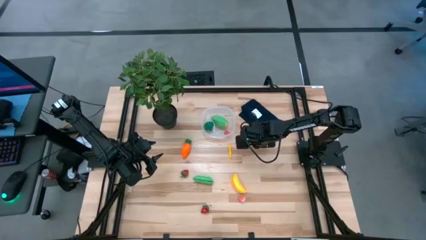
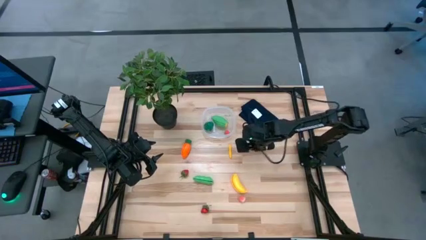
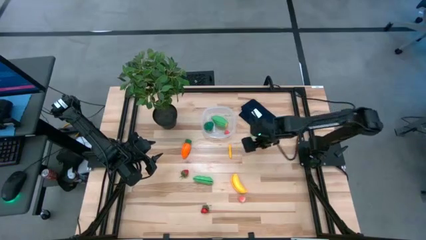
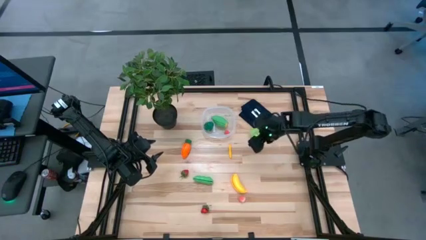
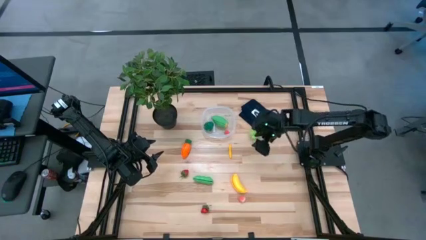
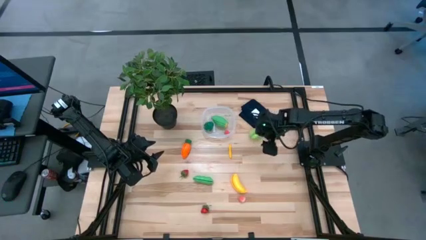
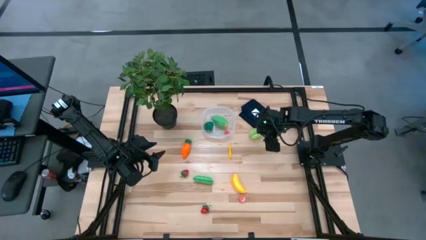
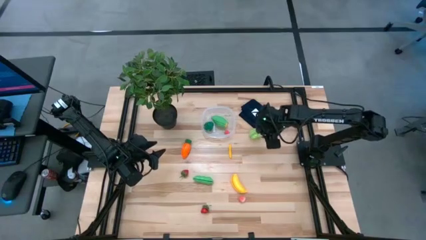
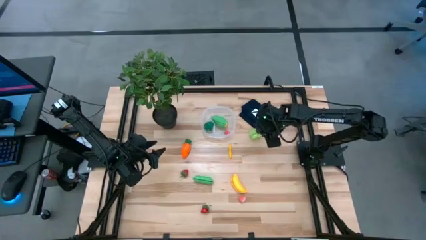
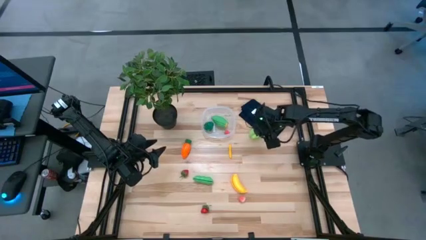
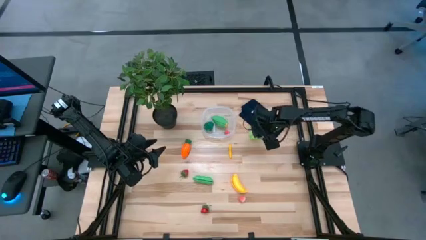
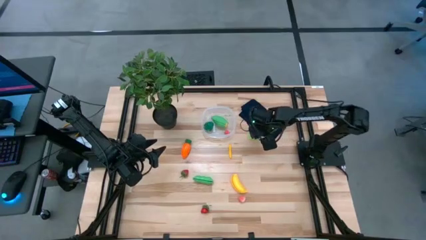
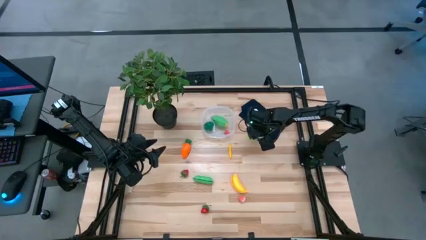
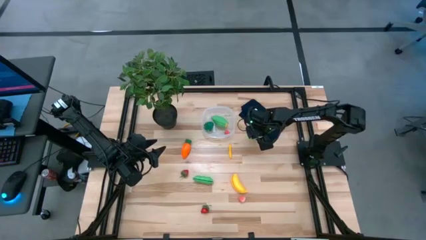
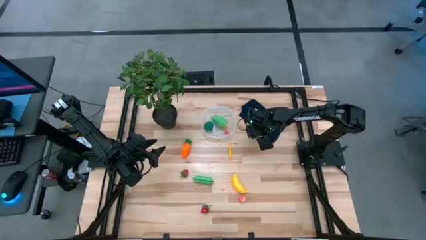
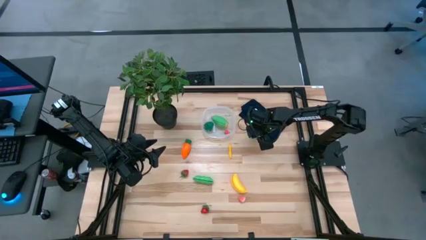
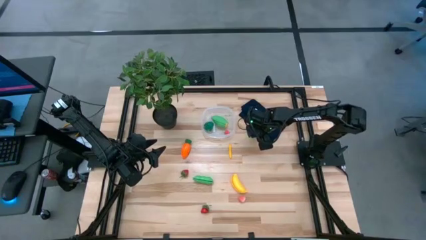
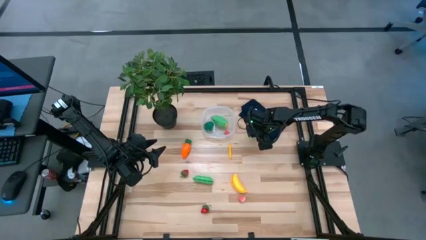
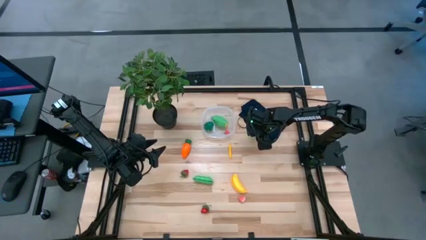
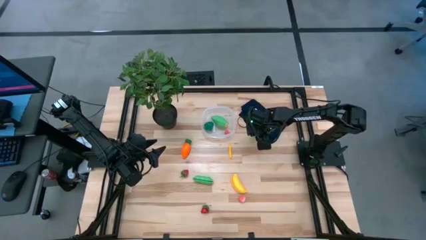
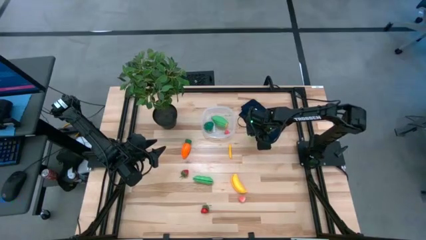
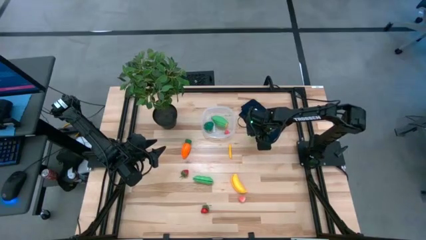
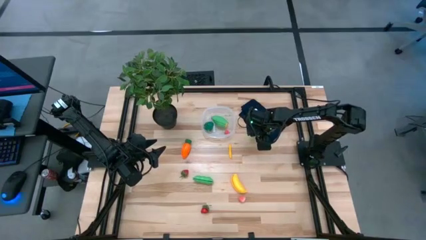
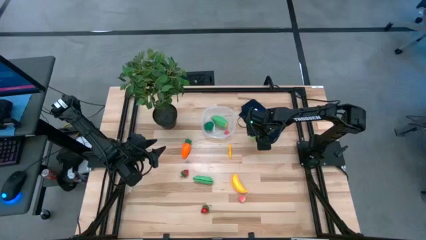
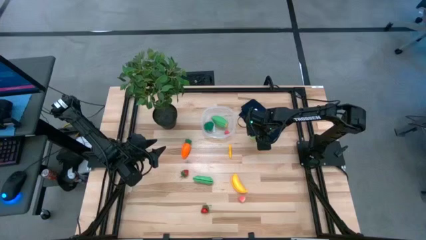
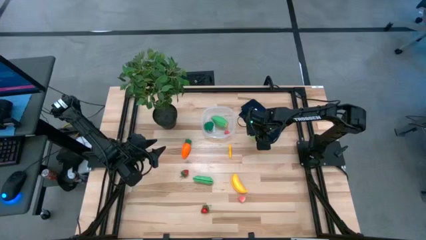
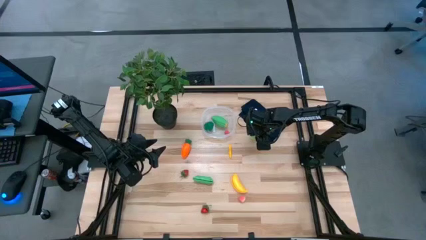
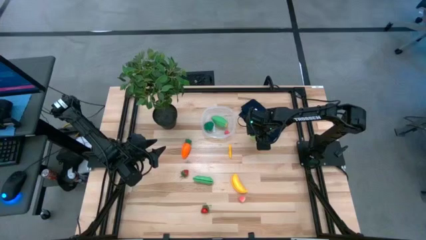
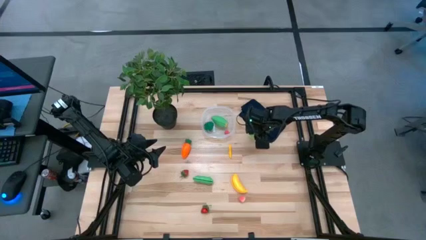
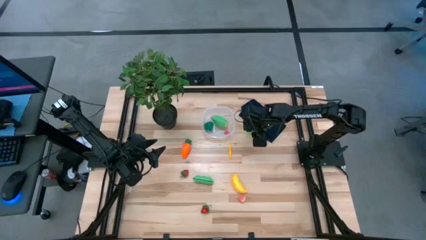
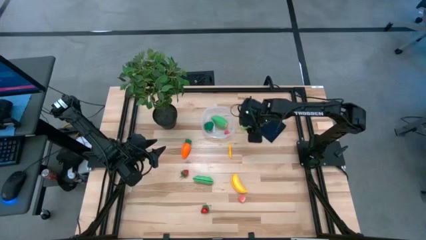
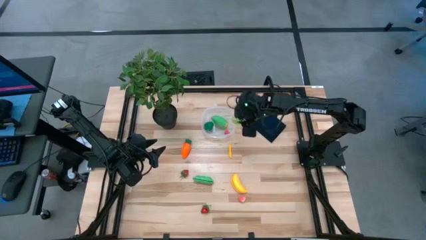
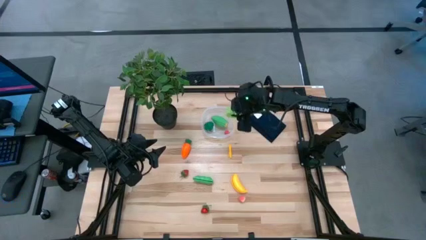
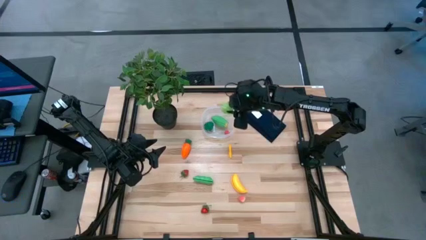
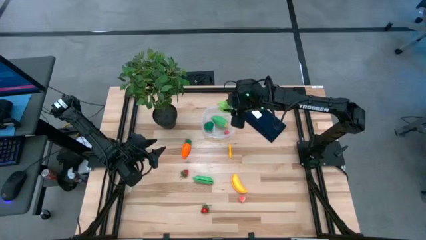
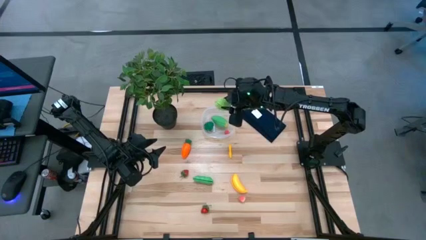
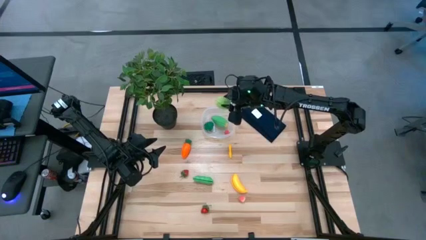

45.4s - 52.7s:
Task: Pick and placing Produce into tupperware
Put the green starfruit into the transparent bin

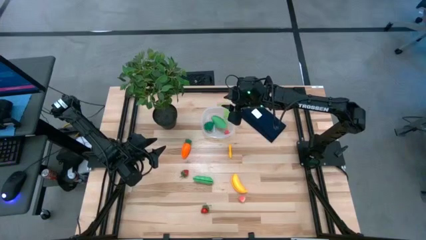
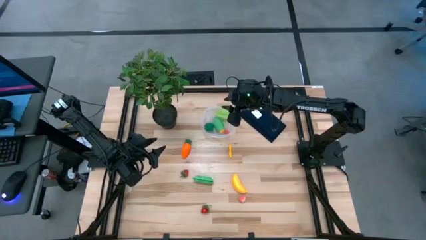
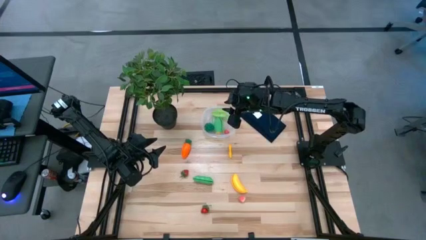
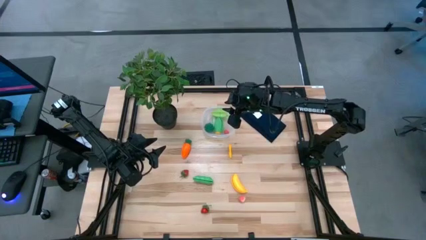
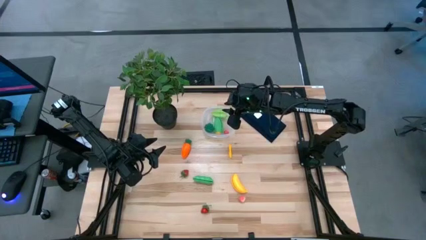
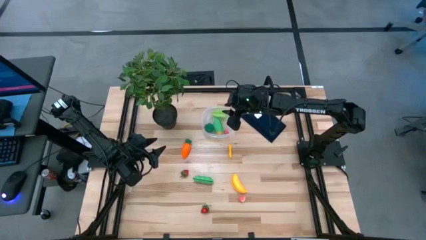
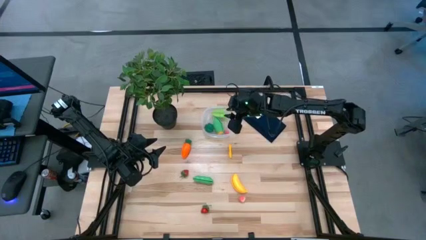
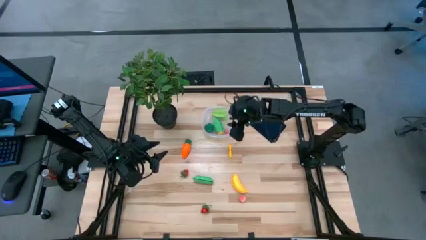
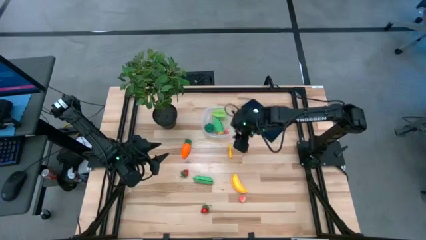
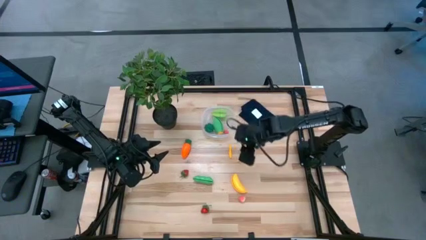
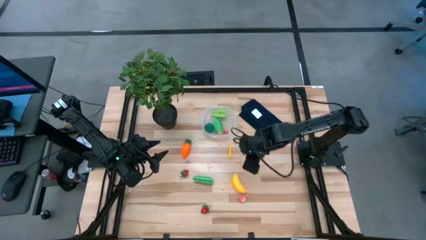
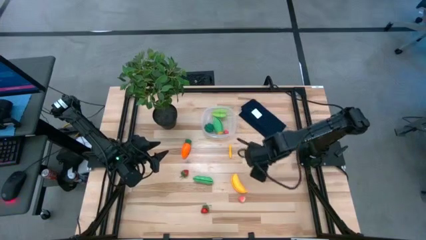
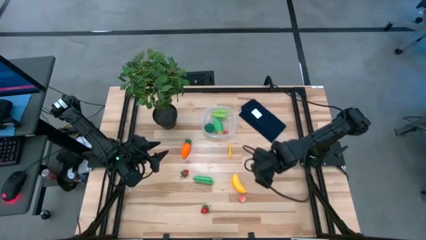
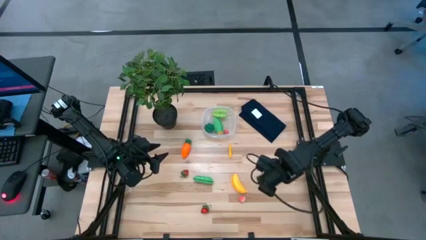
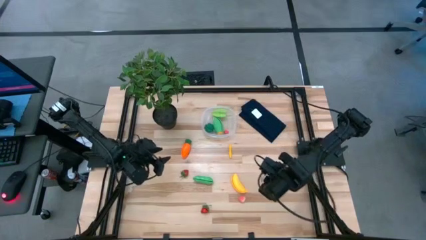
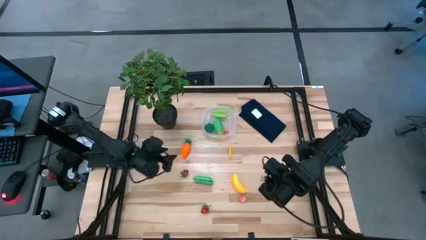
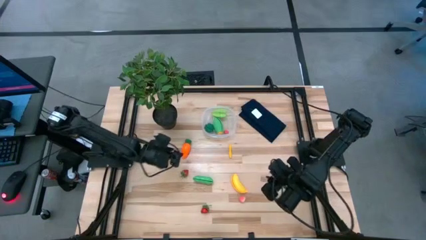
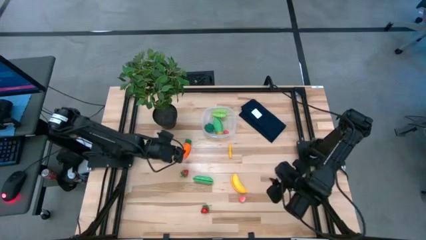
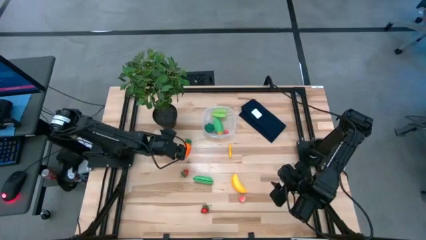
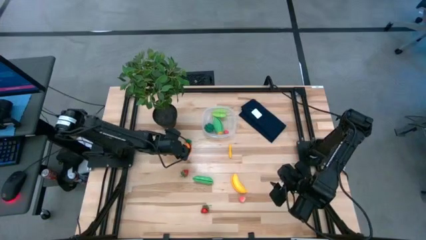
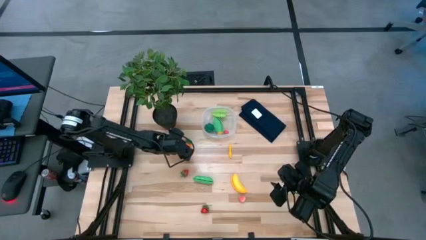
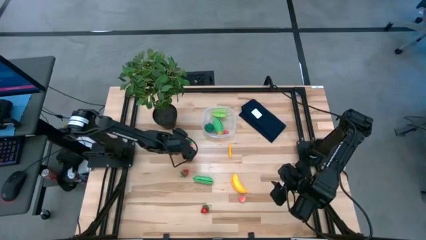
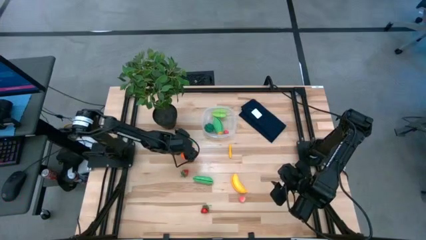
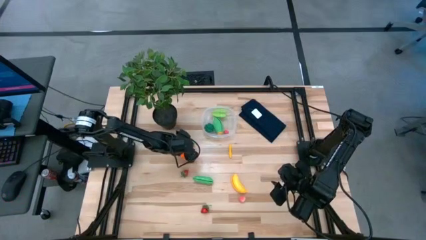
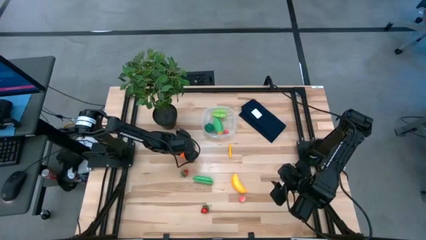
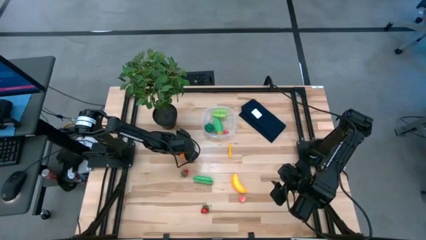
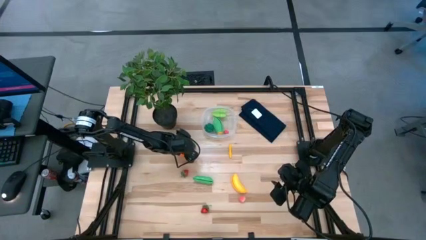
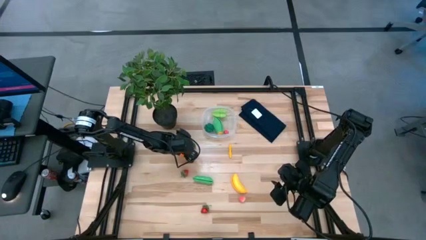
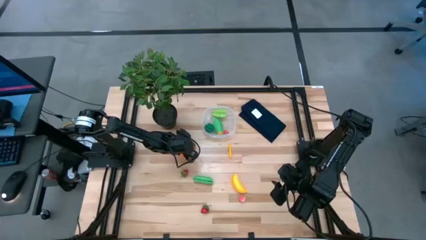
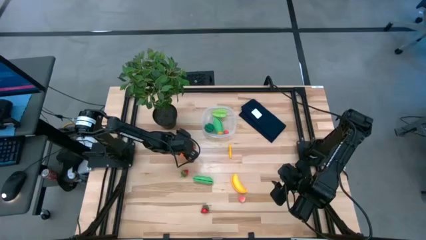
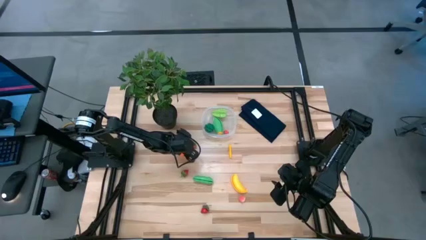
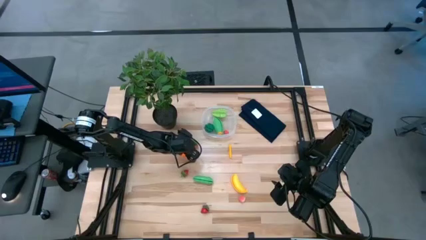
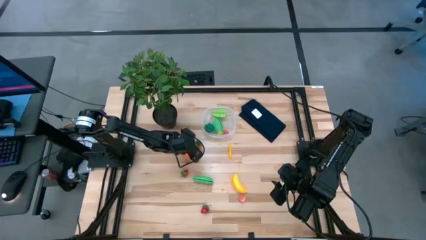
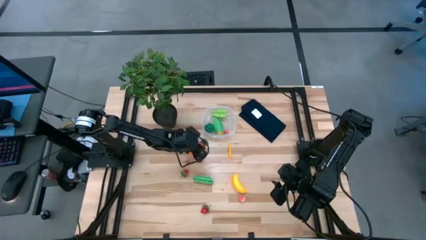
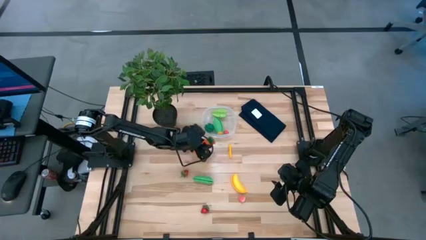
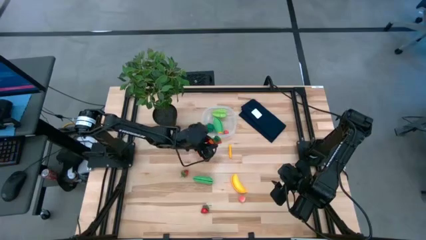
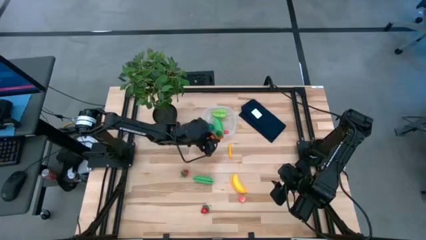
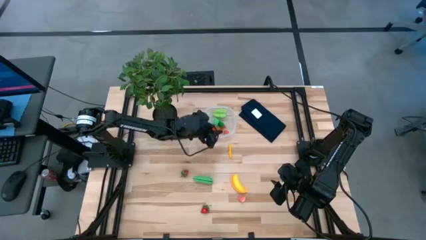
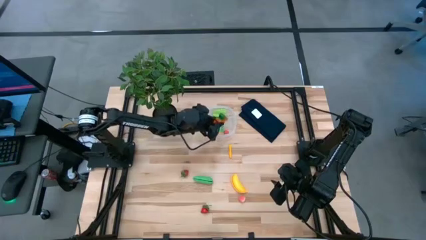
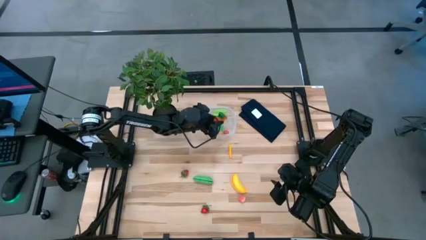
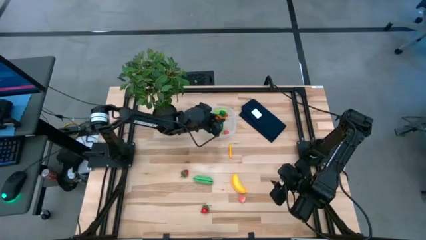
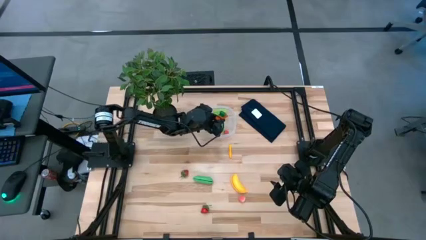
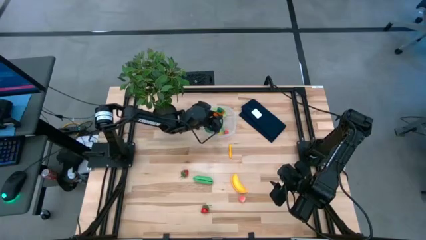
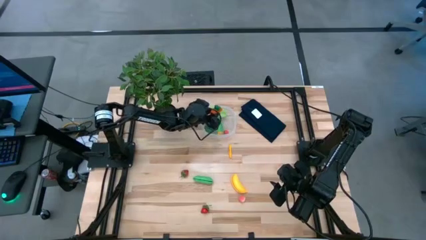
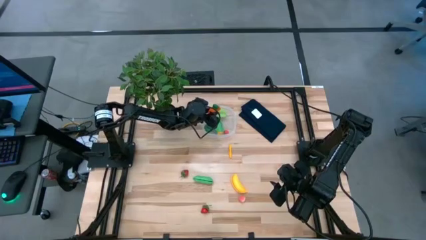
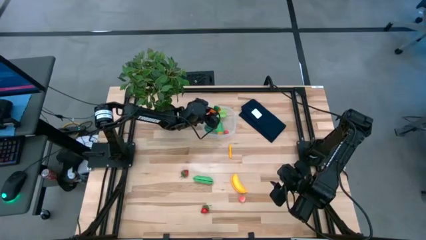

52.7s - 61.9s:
Put the orange carrot into the transparent bin
